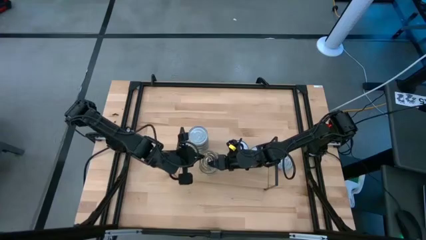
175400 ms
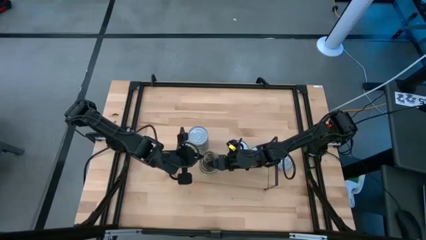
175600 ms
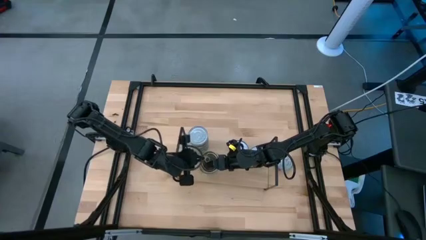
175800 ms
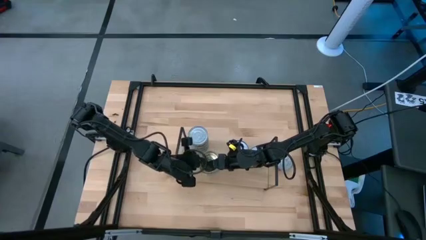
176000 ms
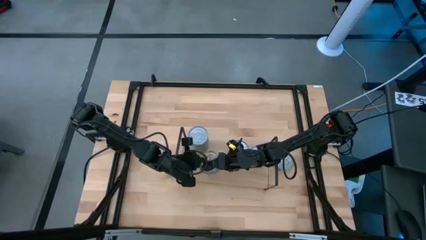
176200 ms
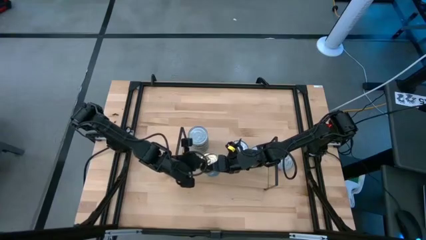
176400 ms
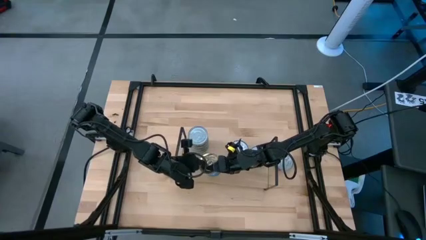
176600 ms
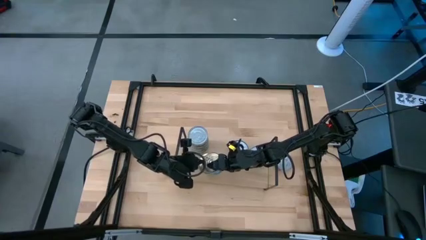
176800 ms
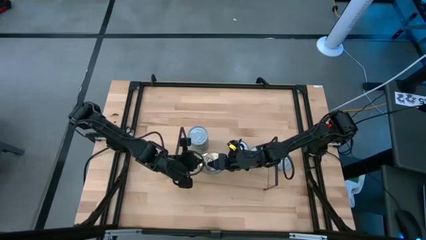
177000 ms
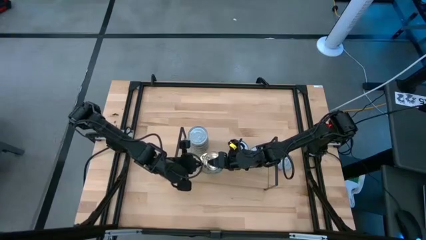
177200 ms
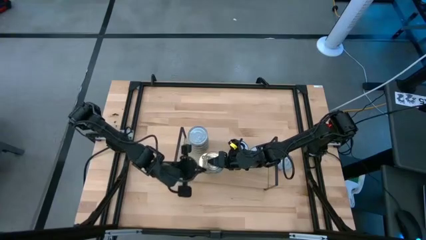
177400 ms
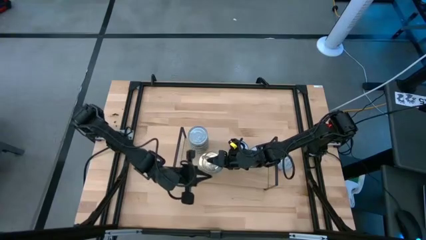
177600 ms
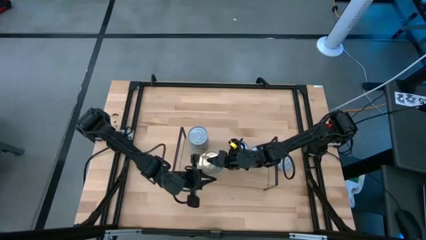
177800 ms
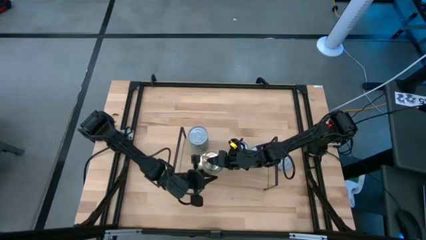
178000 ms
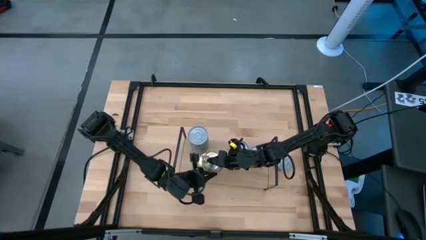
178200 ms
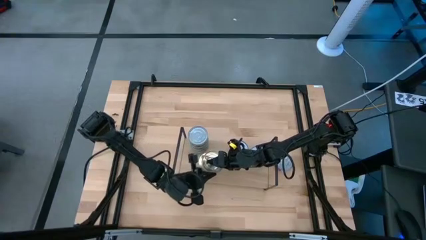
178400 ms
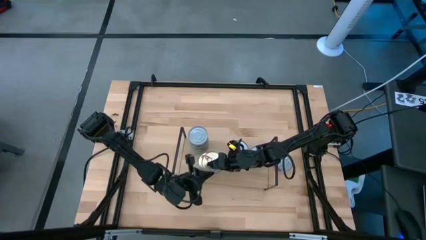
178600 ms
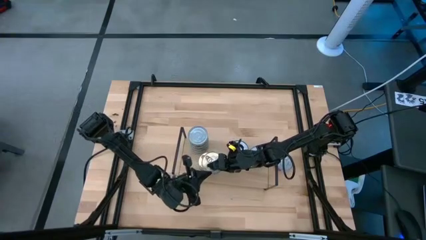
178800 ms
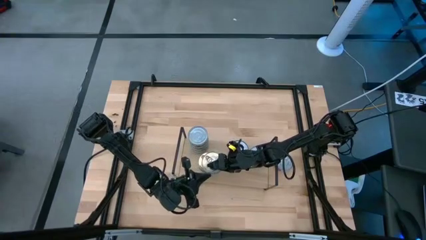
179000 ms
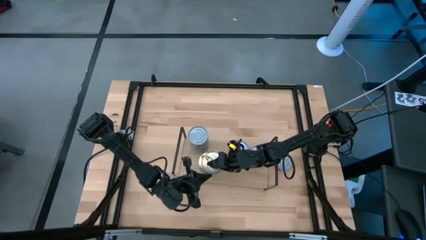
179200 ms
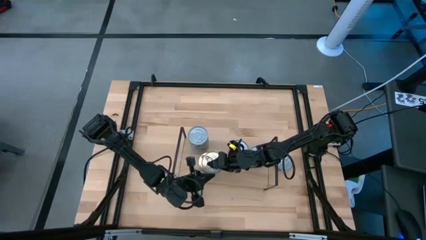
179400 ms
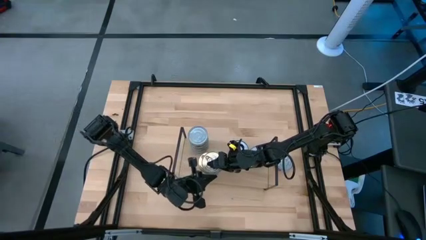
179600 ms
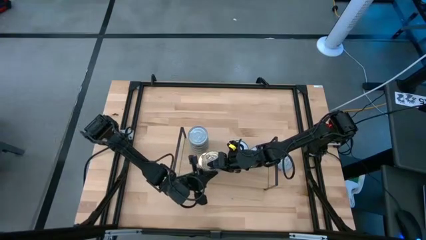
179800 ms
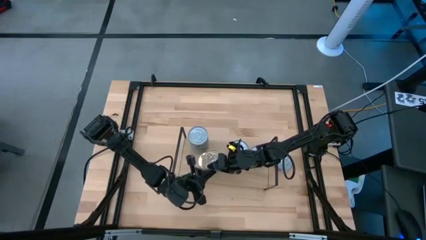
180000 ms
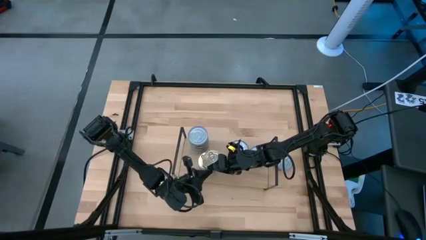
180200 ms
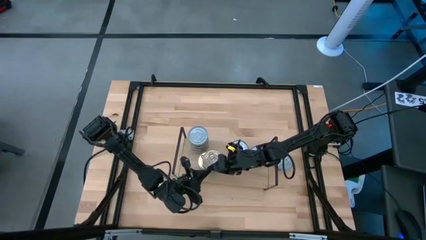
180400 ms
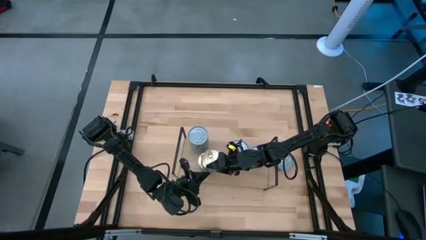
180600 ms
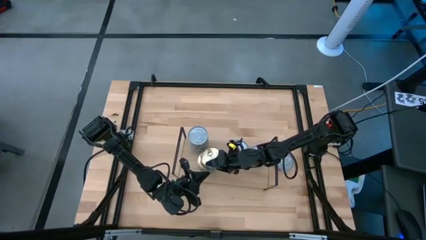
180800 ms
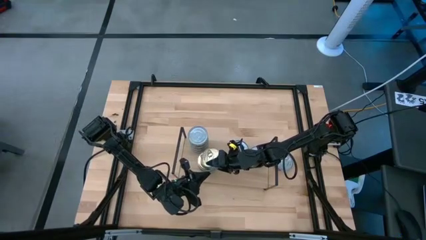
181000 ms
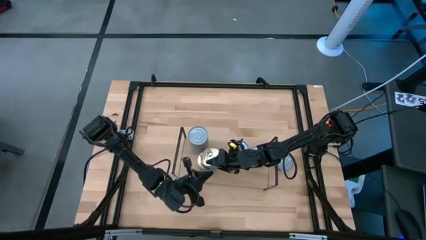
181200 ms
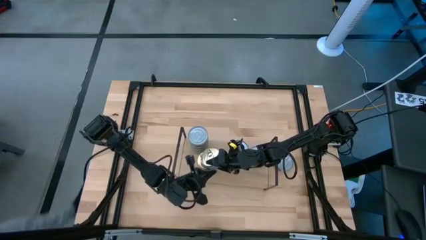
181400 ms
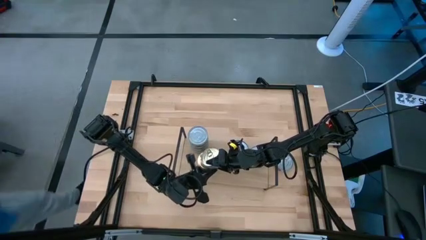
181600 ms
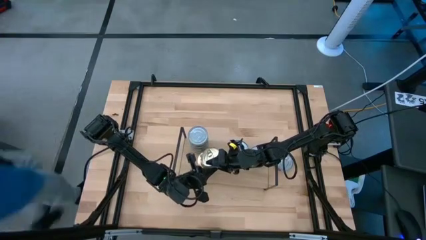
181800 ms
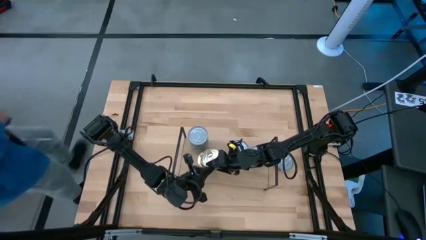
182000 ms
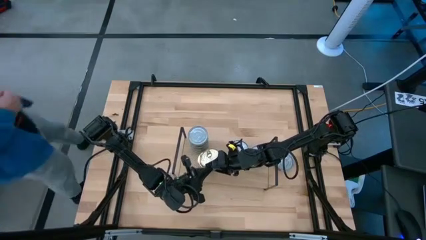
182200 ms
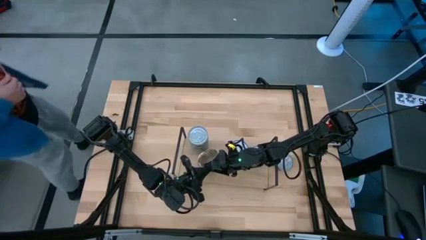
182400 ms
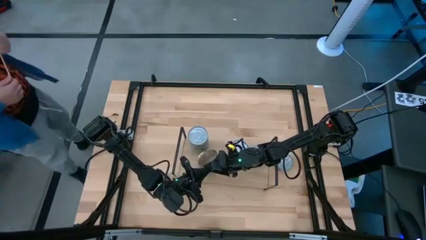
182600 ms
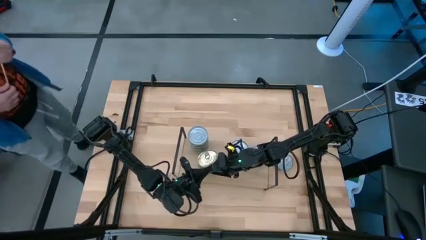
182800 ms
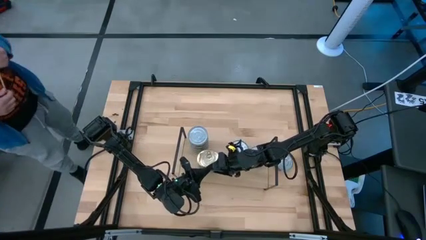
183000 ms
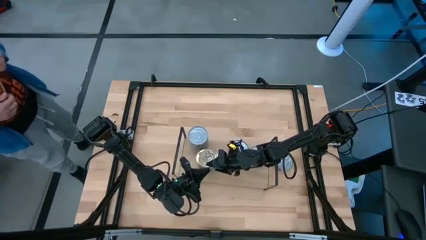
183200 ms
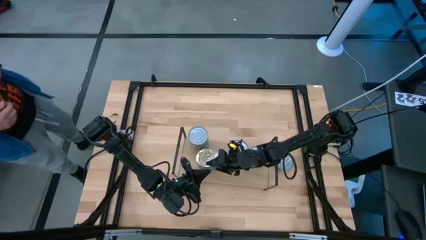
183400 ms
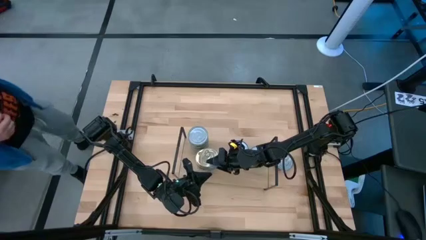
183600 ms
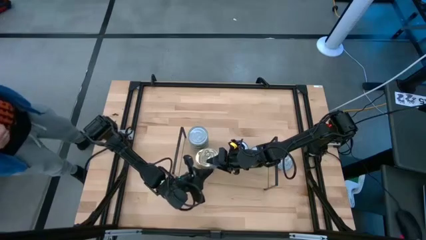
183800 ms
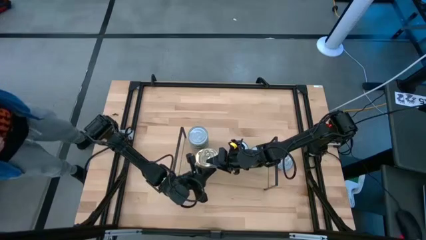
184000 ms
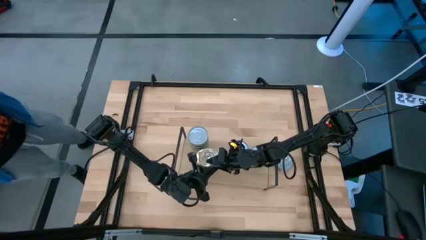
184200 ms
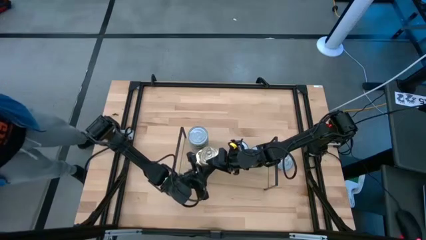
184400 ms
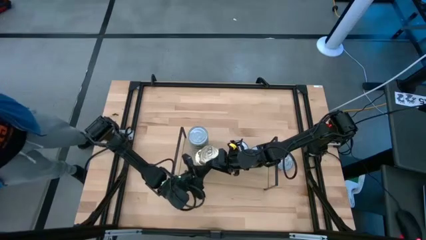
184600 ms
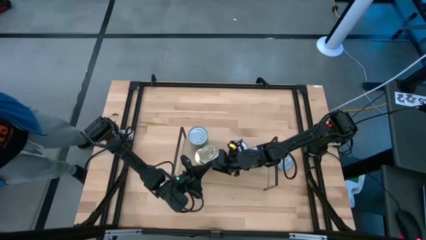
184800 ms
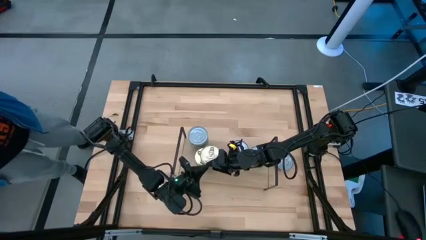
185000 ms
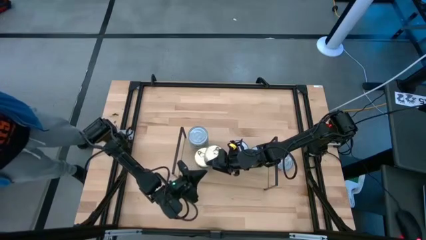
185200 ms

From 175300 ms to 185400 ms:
Task: Stack canned seafood by type on shelf
Stack the blue pink tuna can on top of the blue pink tuna cans on the shelf

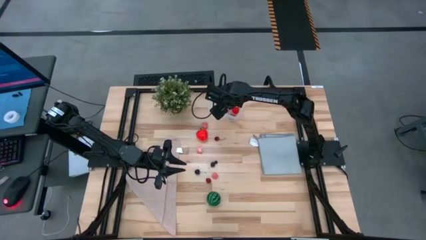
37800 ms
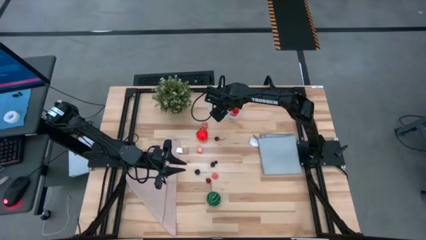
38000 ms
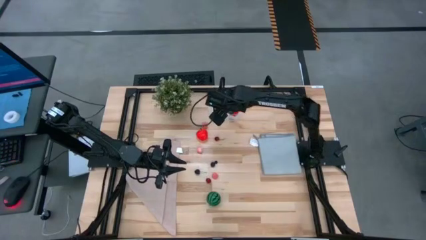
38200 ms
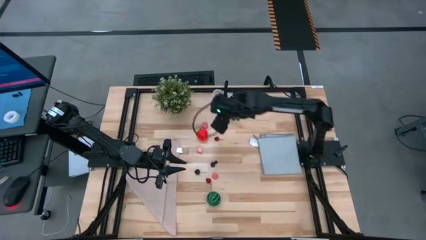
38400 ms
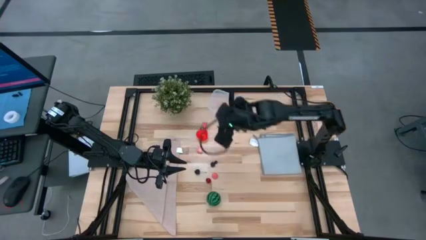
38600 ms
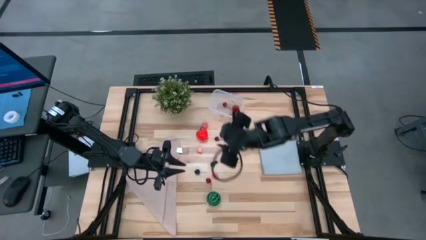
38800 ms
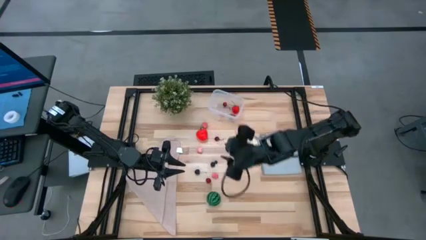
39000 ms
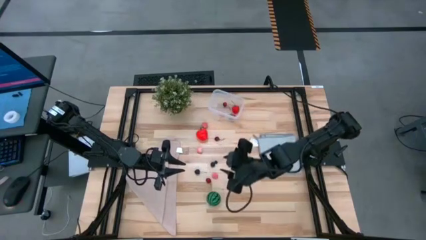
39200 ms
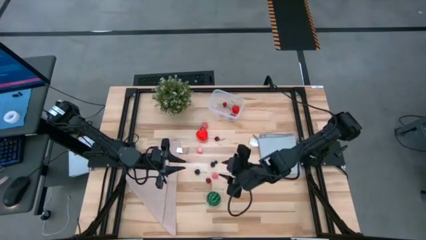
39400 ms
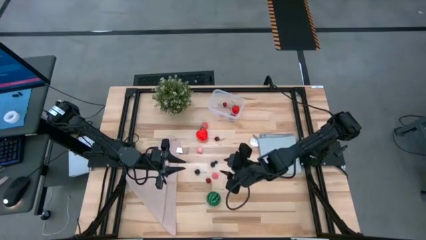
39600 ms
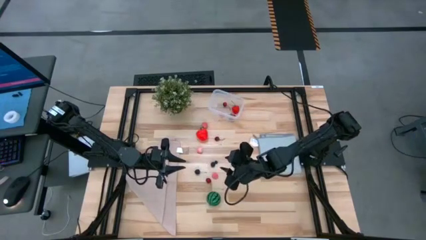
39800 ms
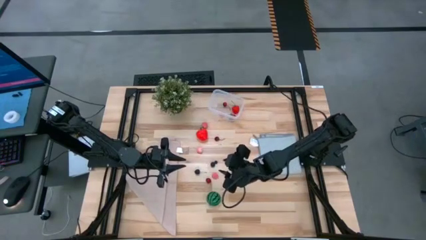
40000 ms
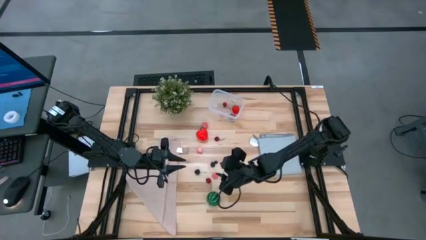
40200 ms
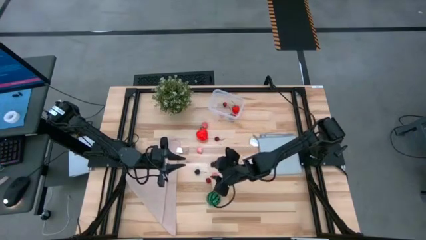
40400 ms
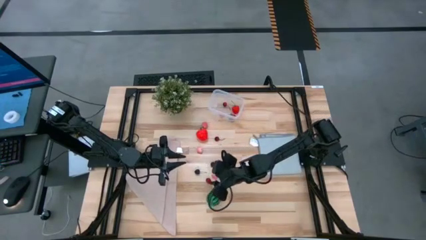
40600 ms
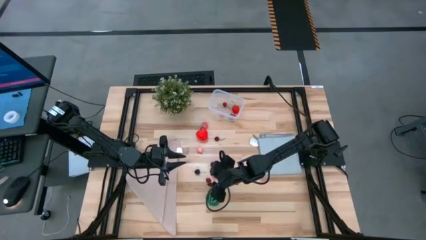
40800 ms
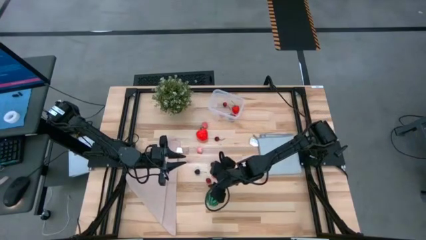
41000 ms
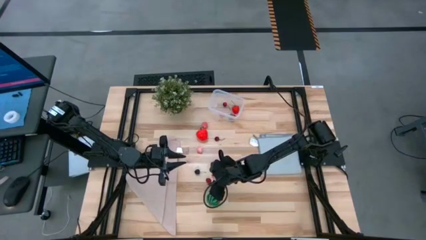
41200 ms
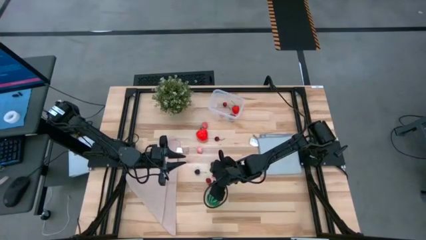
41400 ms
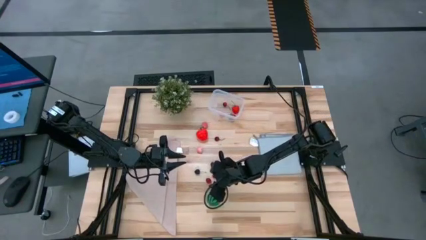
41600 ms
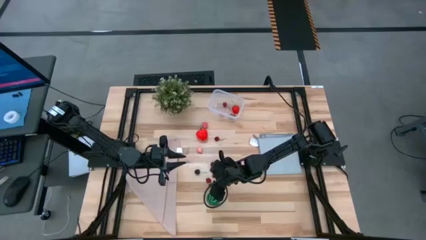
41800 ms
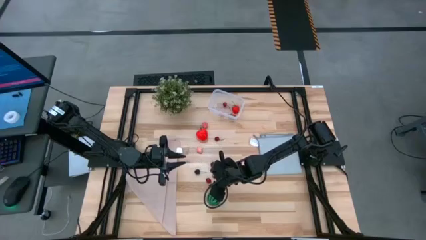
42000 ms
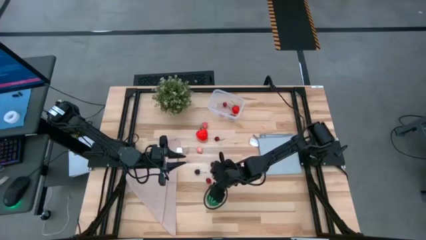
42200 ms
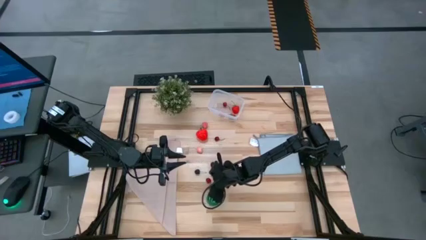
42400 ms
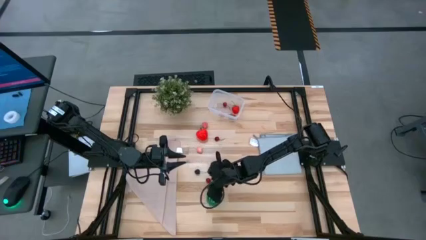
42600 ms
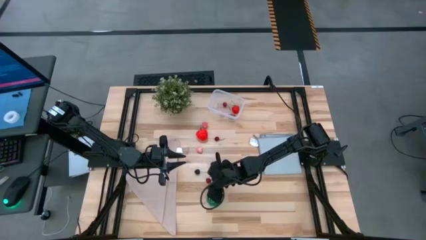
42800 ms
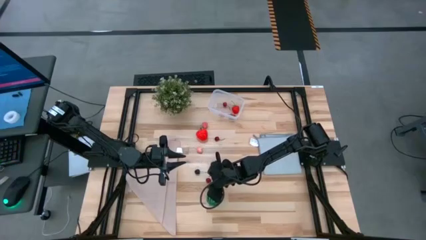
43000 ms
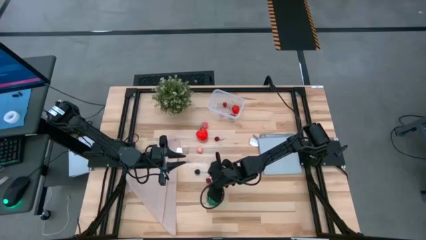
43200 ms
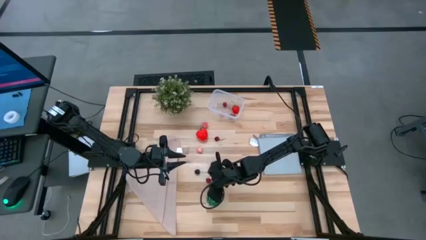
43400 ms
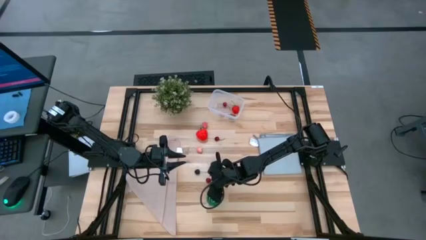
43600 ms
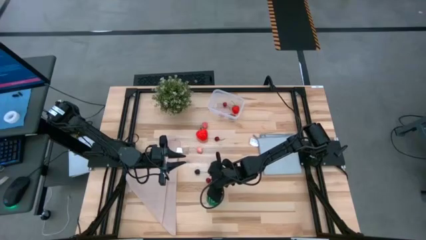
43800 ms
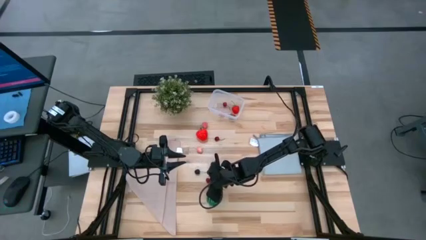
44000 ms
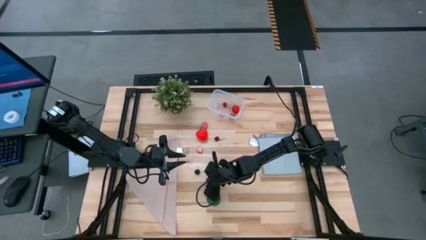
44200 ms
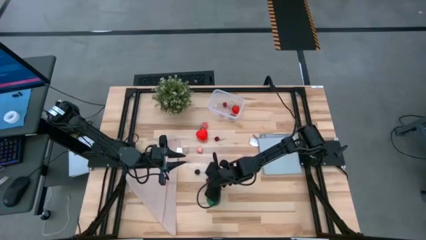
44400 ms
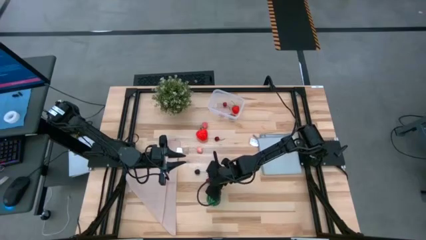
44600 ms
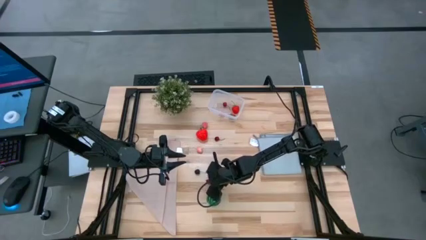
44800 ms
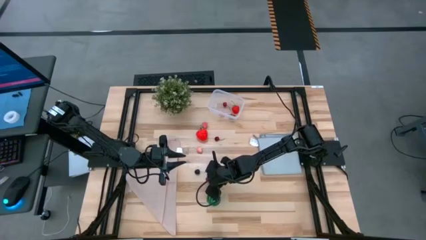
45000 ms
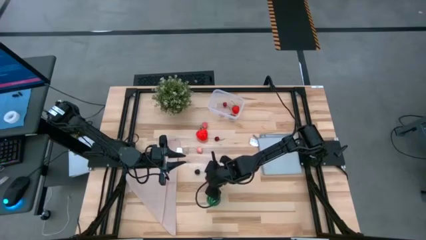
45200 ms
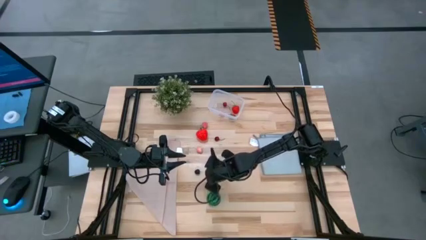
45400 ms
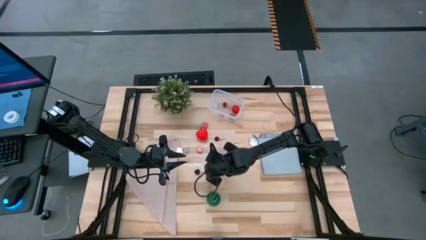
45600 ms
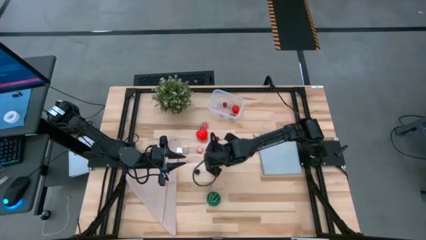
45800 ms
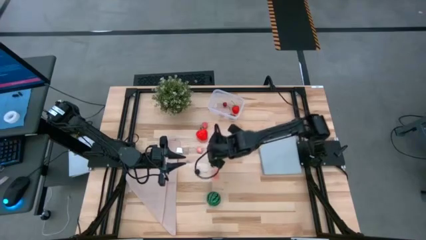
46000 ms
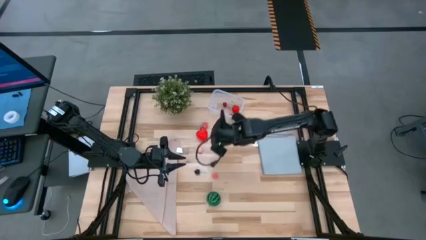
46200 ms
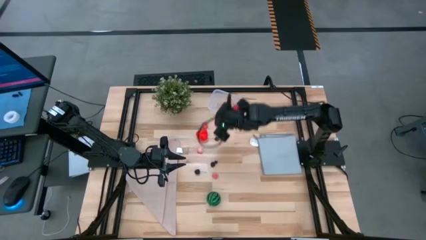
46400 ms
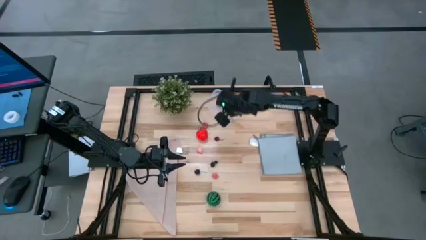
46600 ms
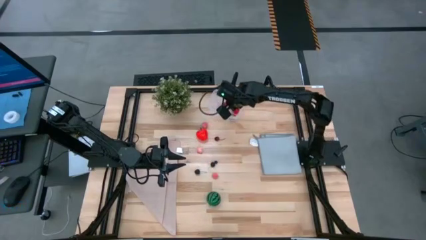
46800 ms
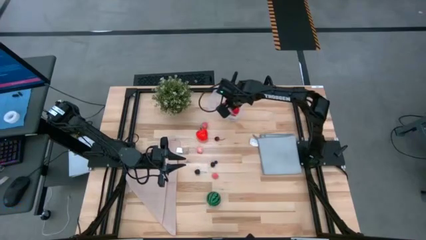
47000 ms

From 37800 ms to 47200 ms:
Task: Pick and placing Produce into tupperware
Put the red cherry into the transparent bin
